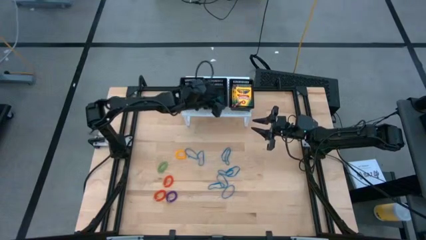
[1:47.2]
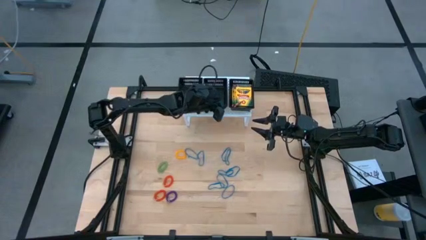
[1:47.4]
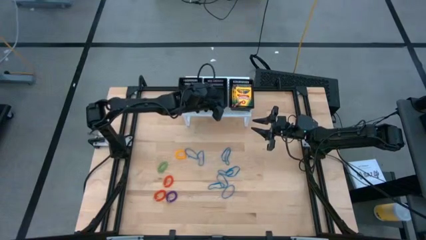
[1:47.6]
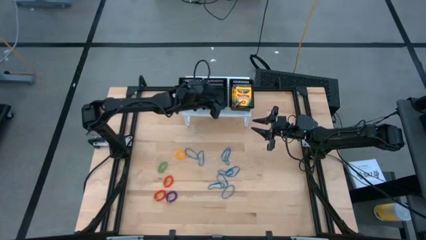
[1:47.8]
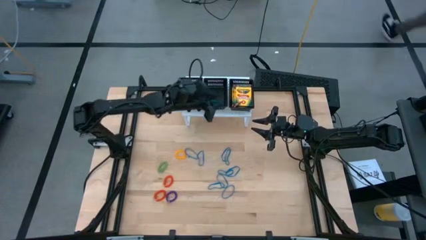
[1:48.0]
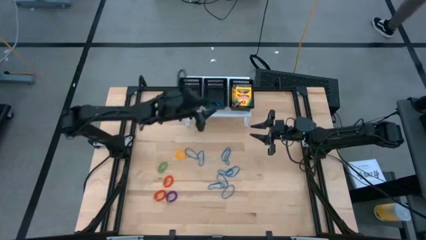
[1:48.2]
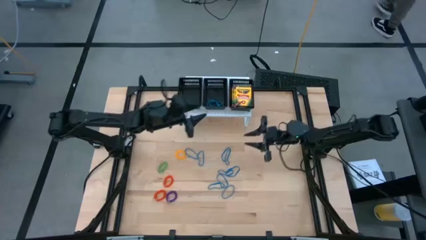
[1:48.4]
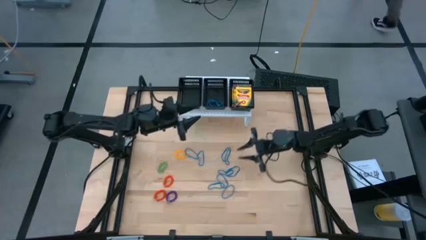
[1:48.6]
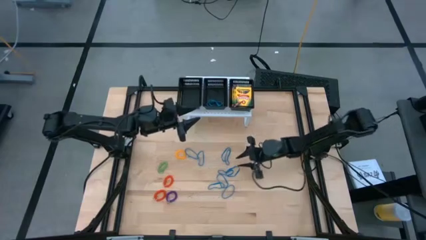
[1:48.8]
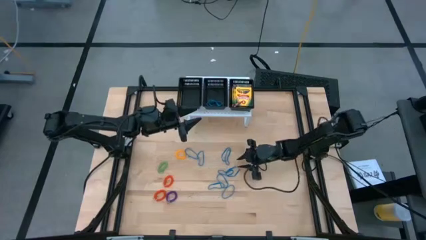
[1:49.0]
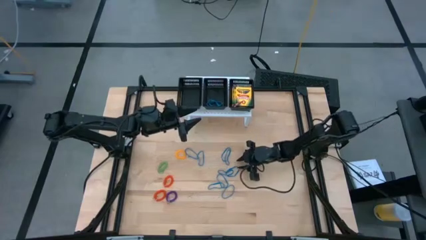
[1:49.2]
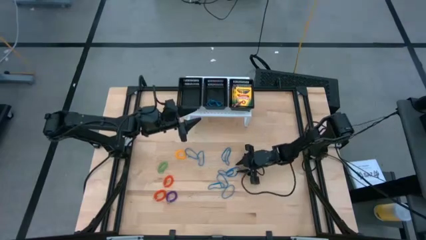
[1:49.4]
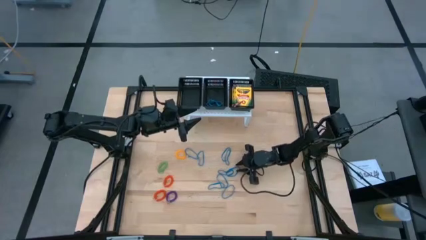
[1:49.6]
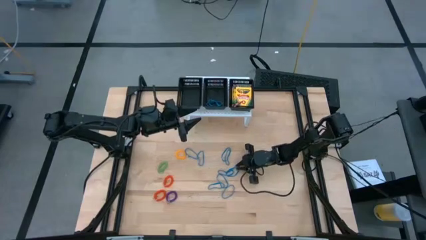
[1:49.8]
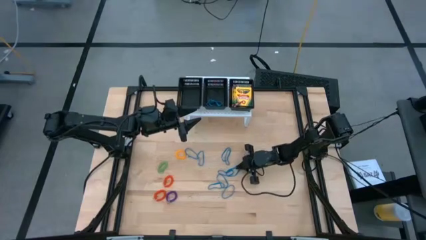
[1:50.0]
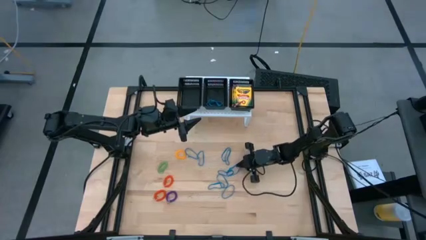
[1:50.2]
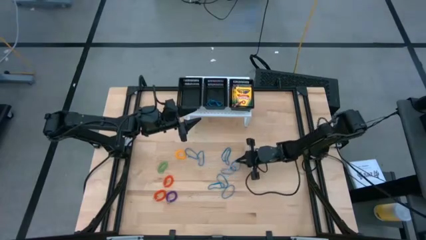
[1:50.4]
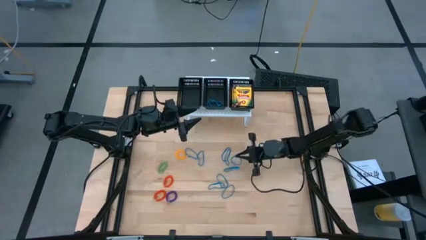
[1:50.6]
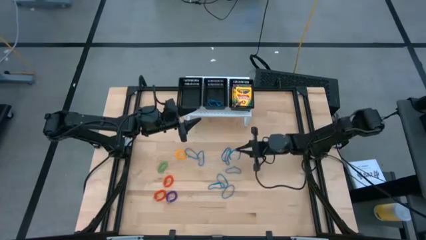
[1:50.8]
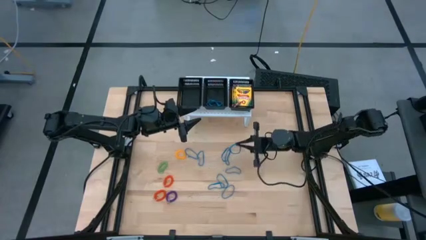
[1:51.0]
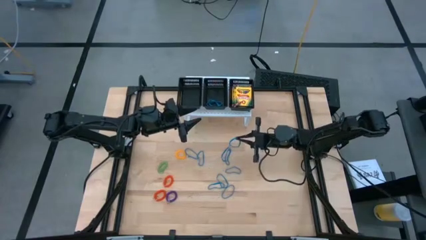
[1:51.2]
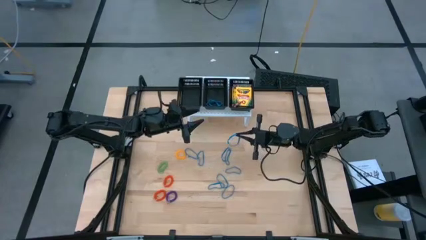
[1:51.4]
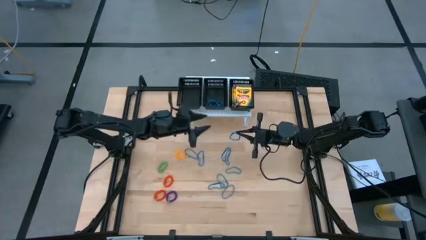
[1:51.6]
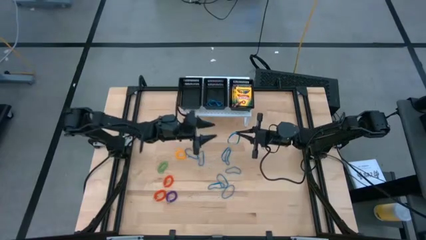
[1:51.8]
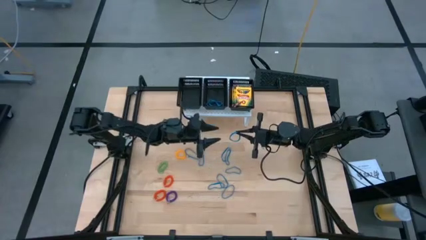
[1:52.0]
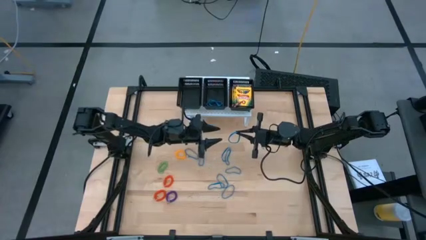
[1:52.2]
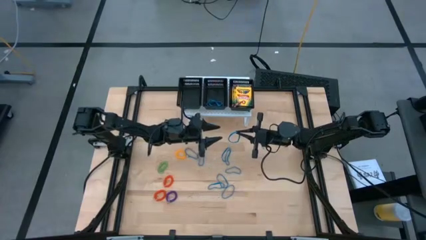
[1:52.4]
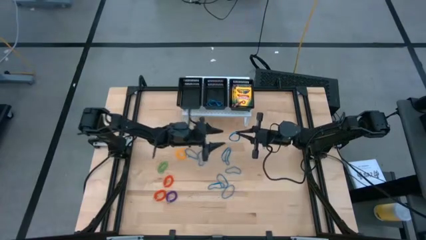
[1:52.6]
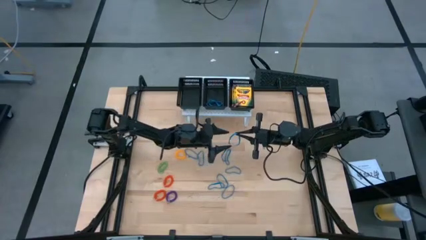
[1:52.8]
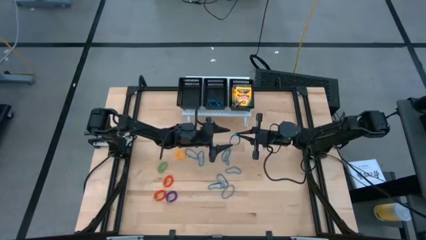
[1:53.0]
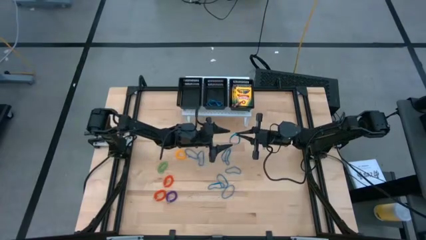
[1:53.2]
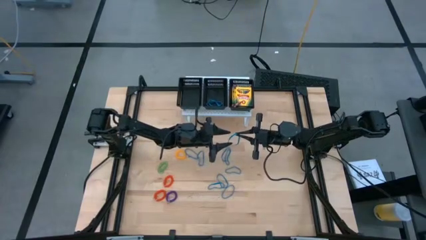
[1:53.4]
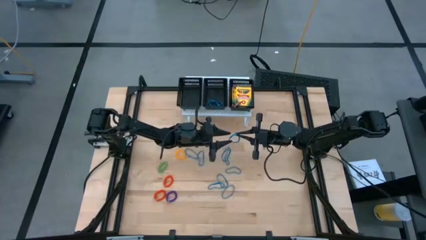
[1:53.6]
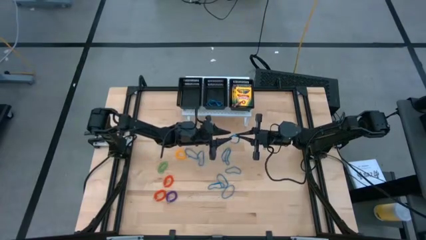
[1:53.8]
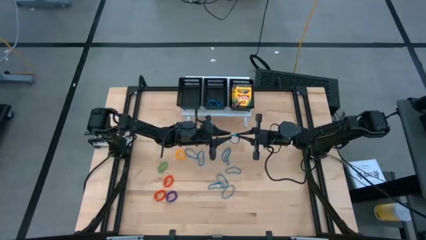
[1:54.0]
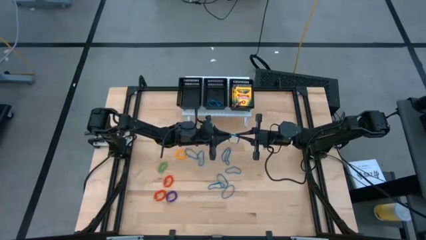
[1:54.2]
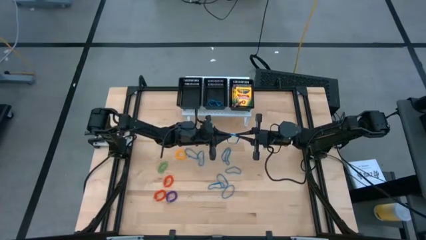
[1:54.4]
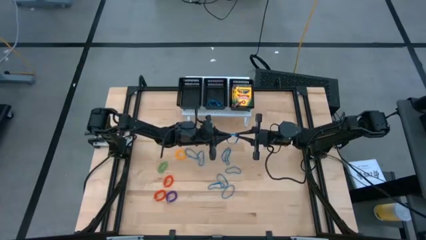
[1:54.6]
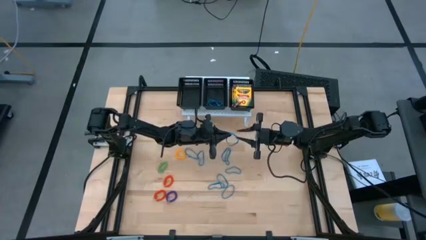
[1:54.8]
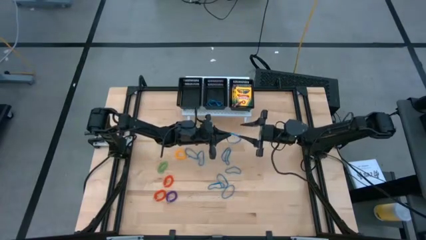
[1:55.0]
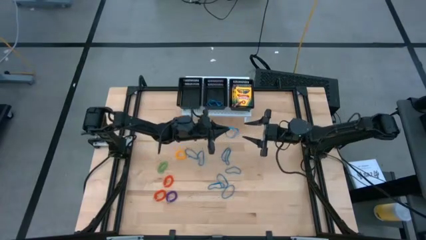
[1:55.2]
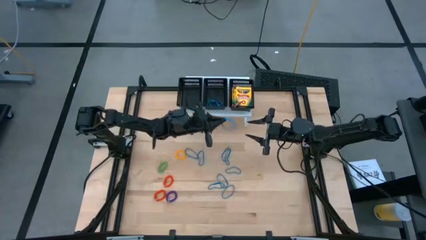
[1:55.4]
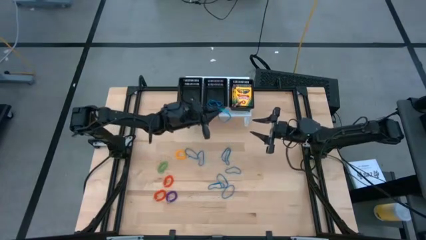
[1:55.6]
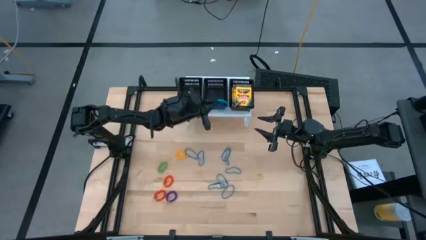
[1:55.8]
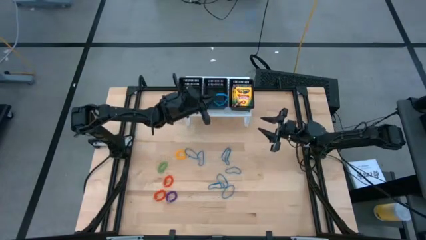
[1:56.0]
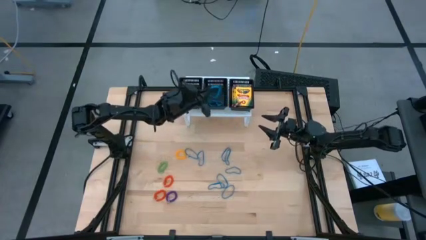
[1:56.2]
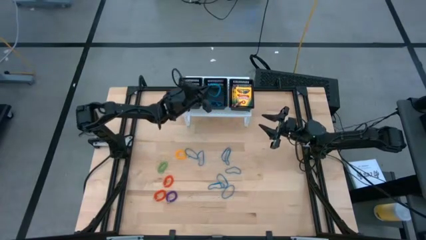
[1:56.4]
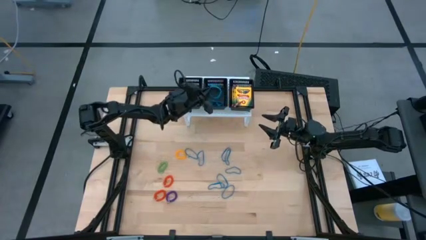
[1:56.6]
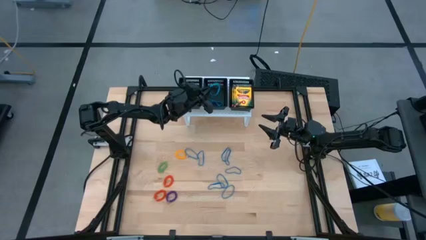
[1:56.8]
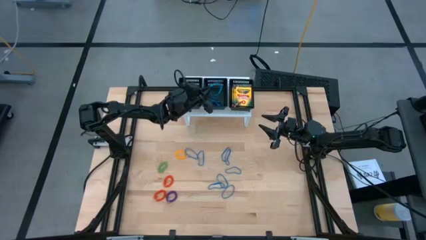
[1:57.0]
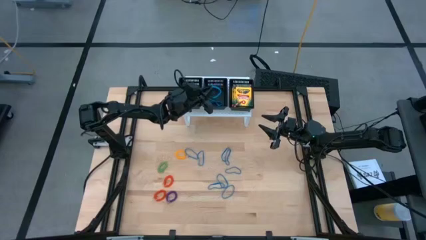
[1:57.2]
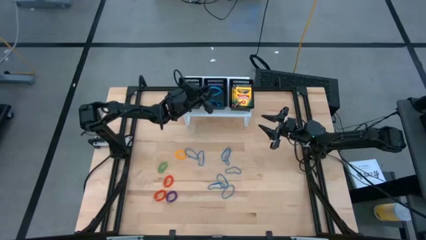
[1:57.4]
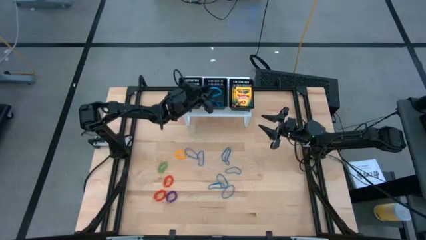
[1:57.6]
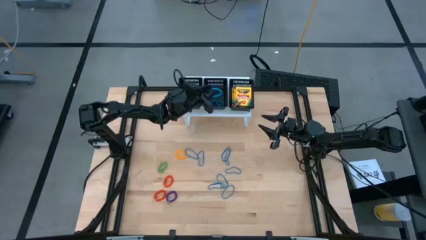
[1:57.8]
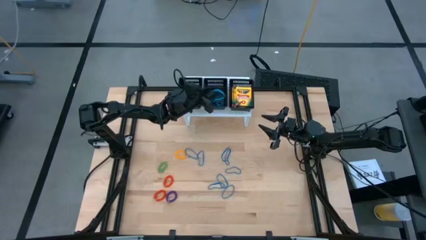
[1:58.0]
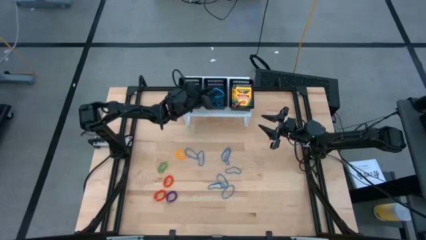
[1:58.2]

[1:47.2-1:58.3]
Task: Pick & Place Office Desk Supplies
Put the blue rubber band into the middle black bin
